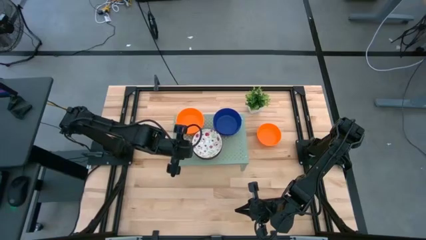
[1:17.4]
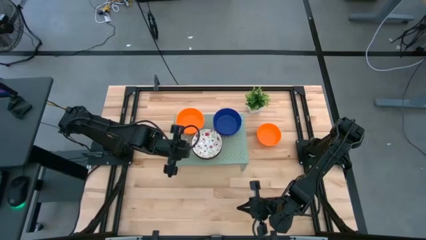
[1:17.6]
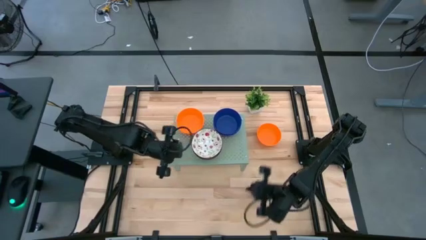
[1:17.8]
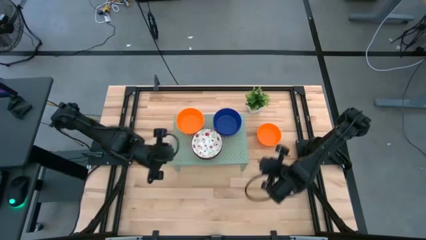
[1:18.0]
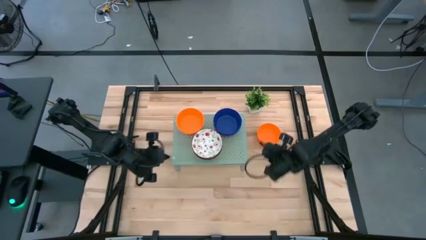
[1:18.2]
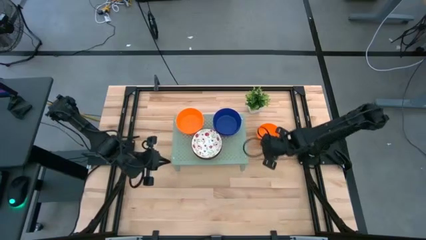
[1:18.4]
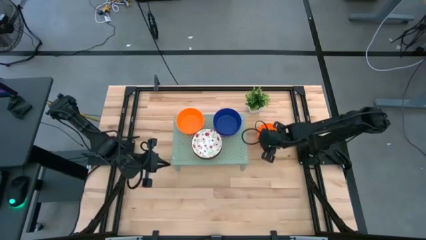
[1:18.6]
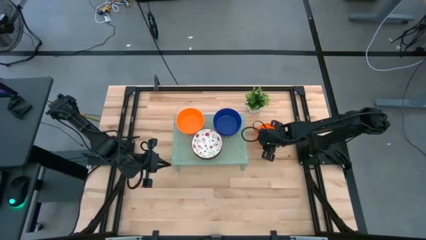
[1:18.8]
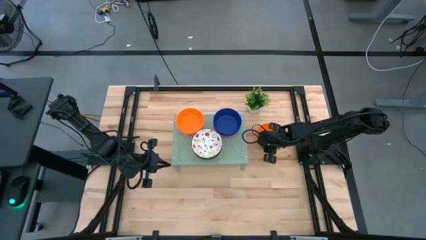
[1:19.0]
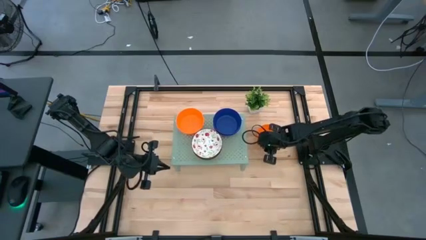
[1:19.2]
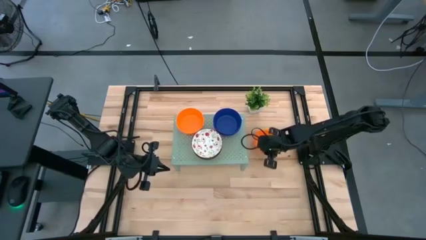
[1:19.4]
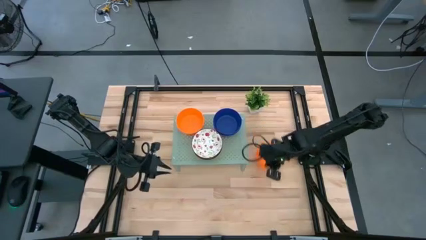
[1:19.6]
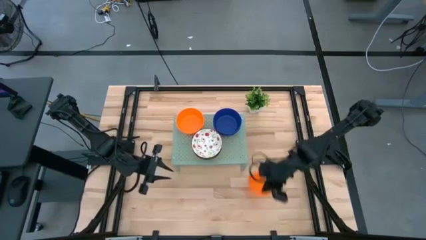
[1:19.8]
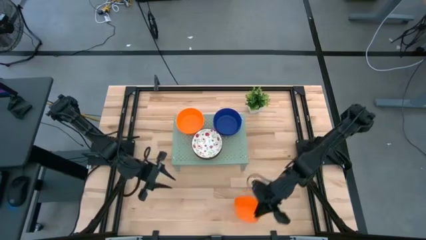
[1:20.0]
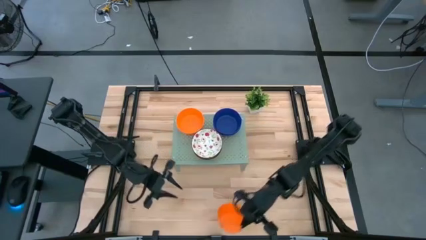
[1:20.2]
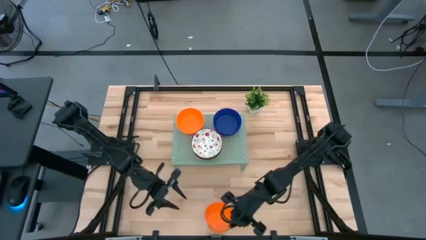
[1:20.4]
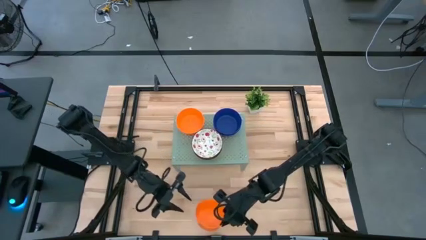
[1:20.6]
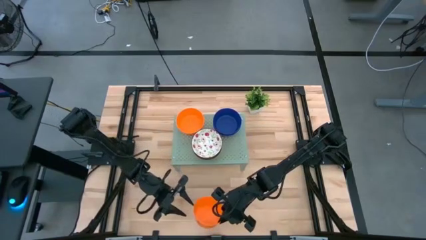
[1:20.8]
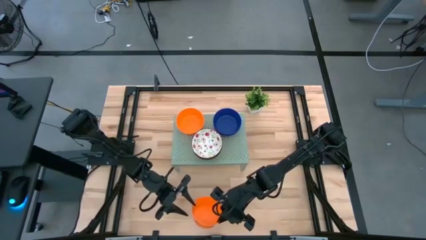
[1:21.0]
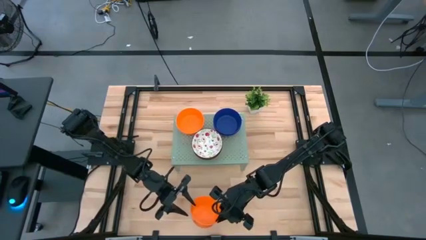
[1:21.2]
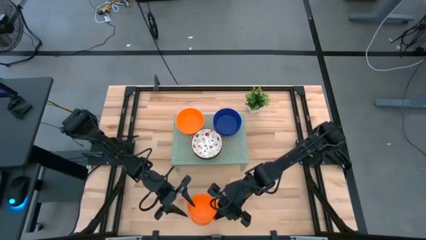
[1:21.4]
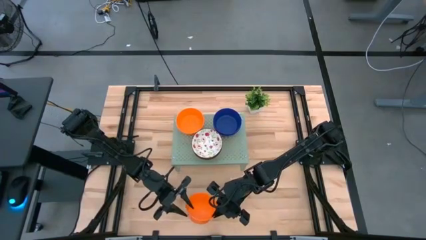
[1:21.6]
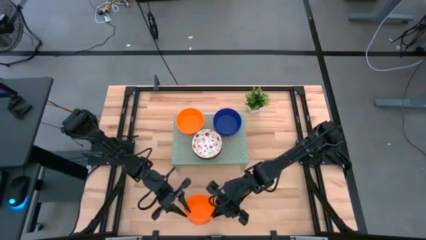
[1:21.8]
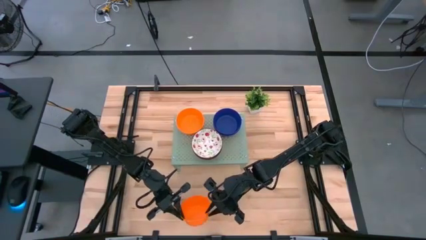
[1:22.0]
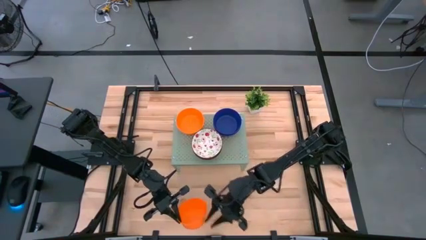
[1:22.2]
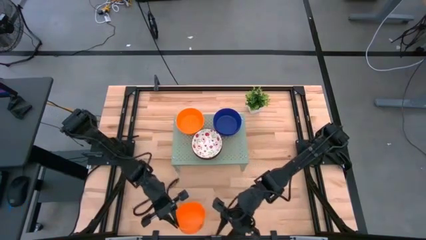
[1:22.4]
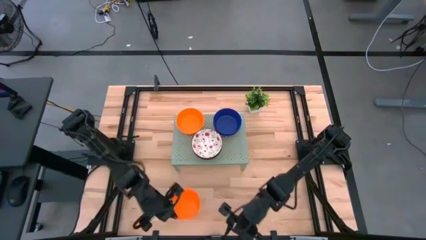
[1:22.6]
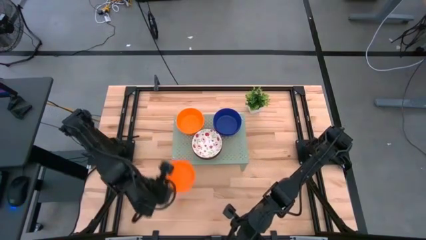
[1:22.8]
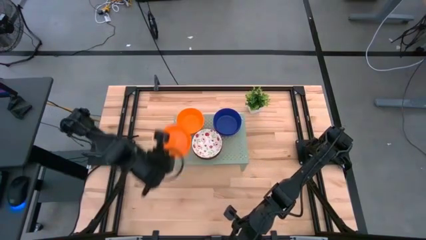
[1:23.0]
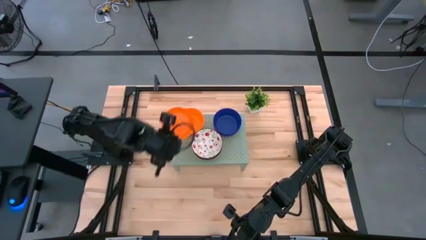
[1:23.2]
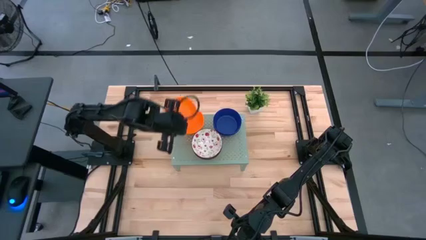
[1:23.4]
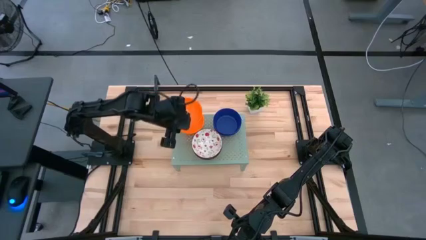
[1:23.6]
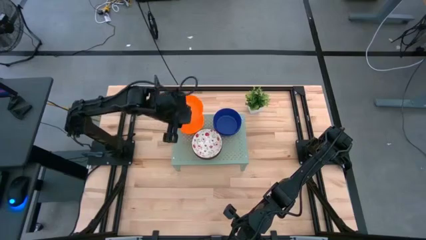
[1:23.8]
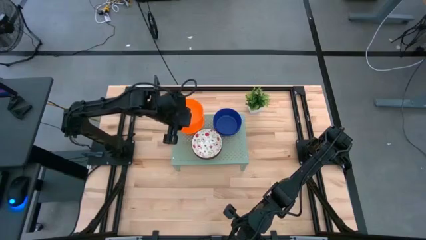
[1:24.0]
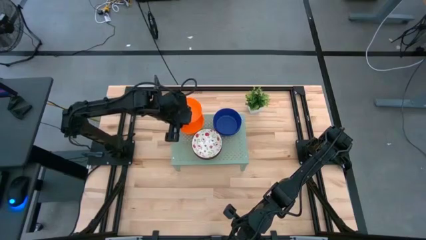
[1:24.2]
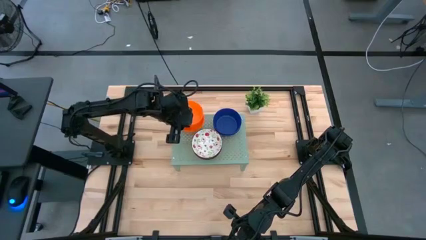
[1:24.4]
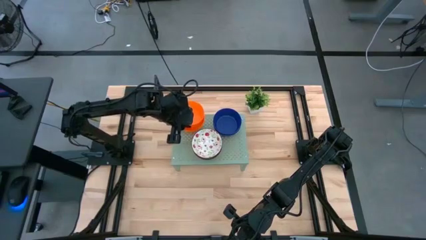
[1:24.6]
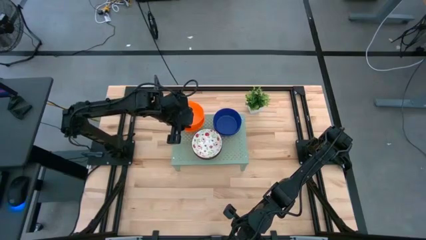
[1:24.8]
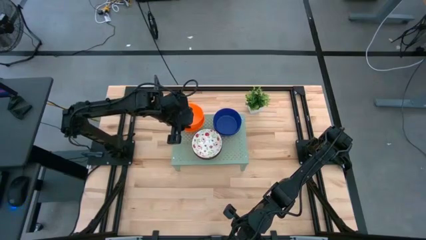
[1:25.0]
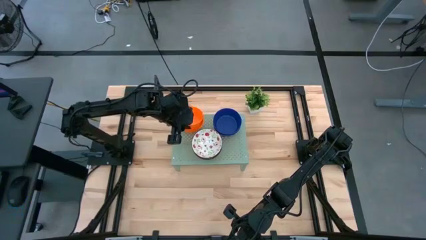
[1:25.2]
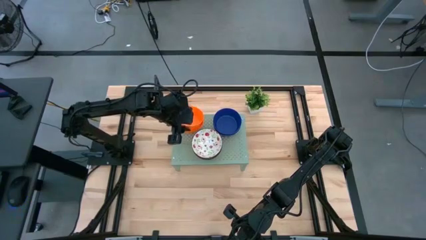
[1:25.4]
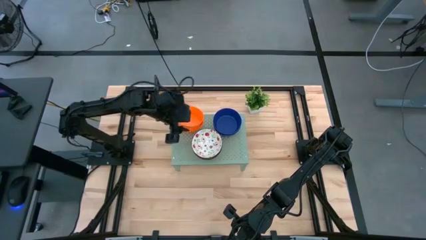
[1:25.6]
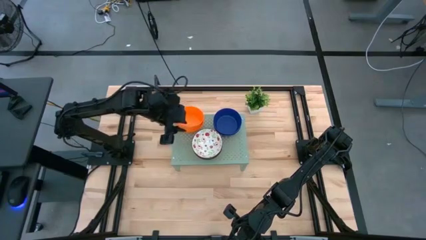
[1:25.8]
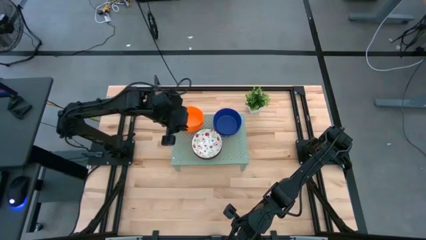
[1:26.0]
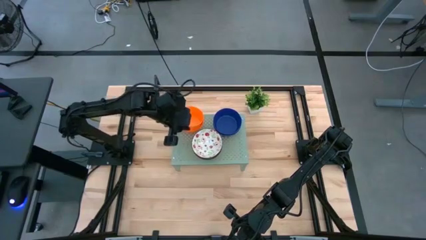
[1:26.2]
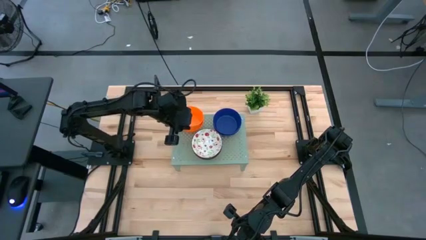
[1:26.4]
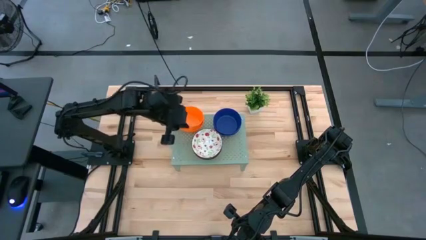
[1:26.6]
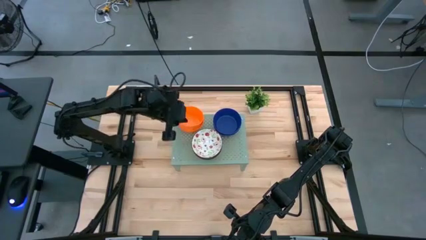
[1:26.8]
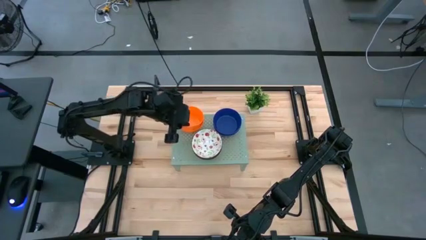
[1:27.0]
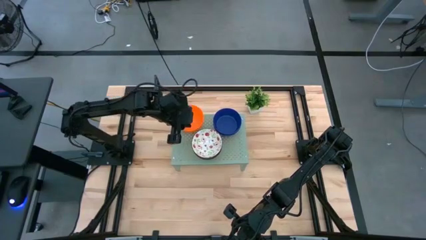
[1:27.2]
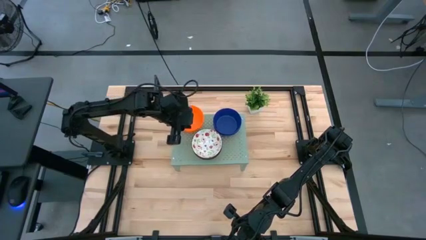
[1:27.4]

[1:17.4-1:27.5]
Task: Pick & Place Mini bowls
Stack the orange bowl on top of the orange bowl on the shelf

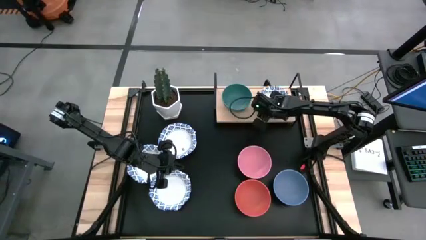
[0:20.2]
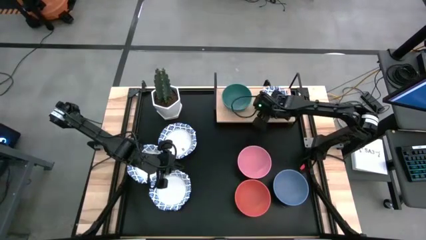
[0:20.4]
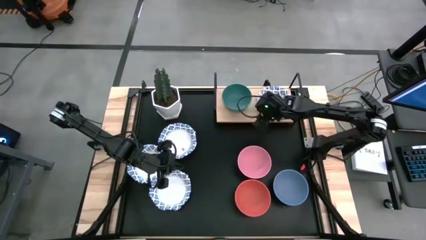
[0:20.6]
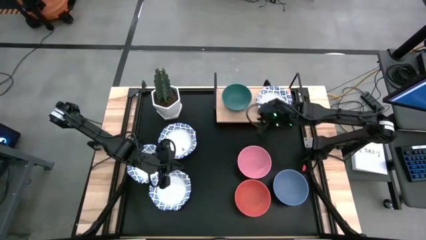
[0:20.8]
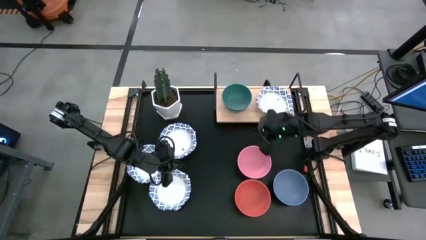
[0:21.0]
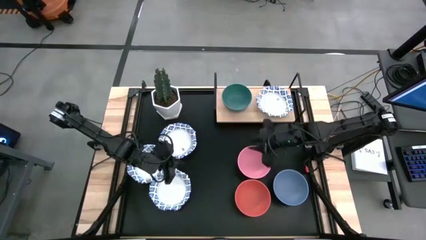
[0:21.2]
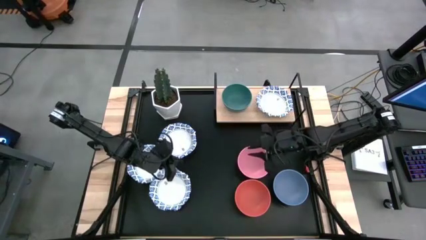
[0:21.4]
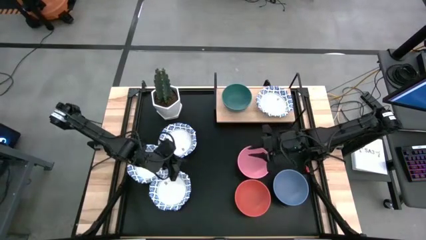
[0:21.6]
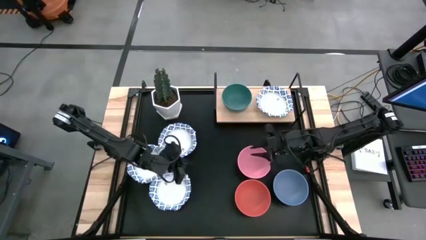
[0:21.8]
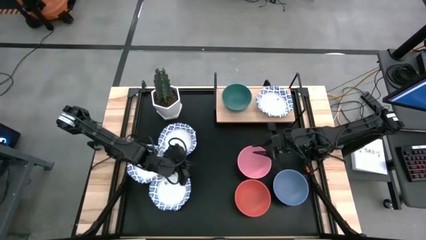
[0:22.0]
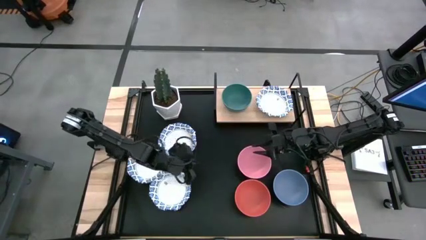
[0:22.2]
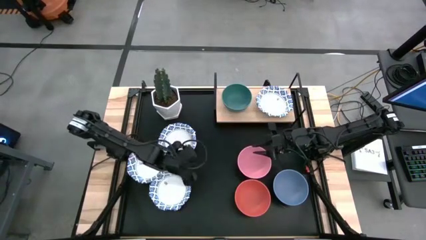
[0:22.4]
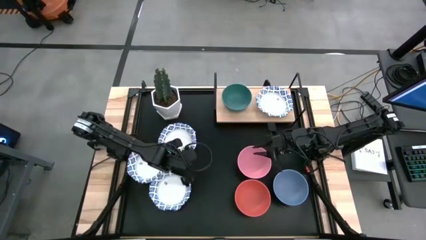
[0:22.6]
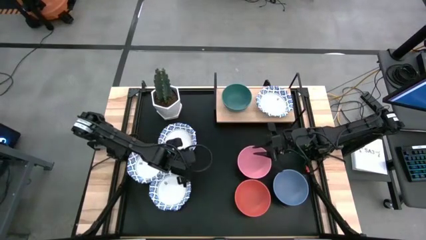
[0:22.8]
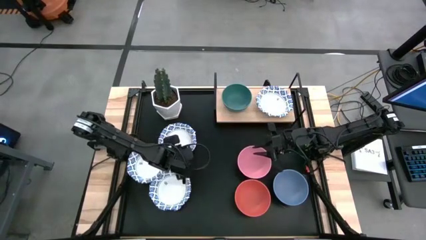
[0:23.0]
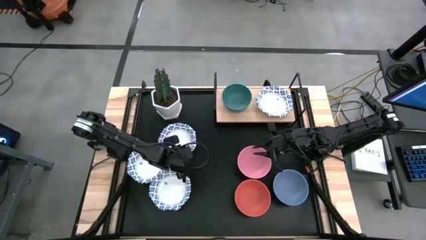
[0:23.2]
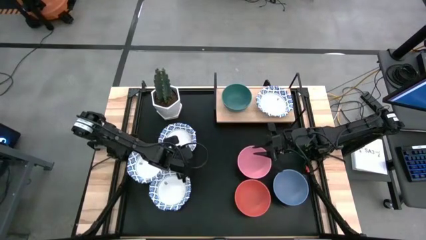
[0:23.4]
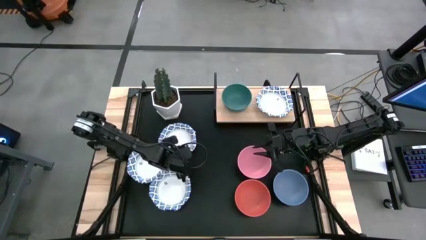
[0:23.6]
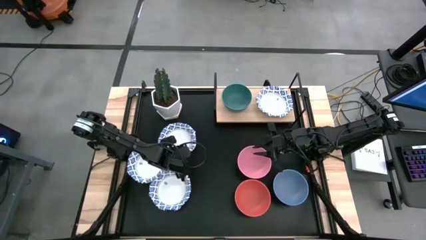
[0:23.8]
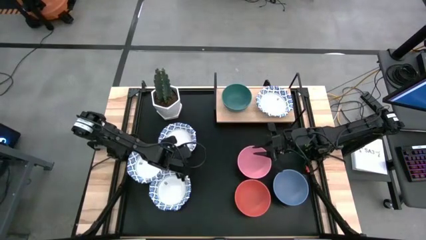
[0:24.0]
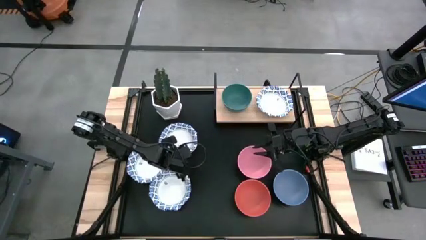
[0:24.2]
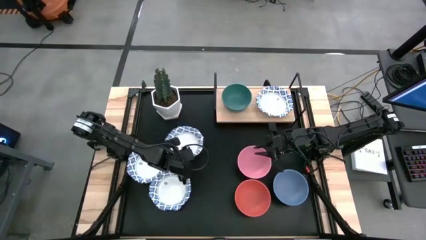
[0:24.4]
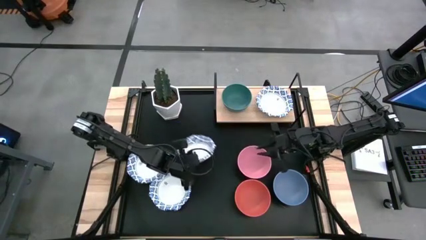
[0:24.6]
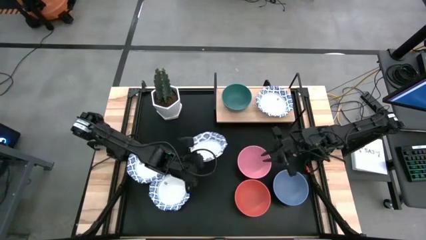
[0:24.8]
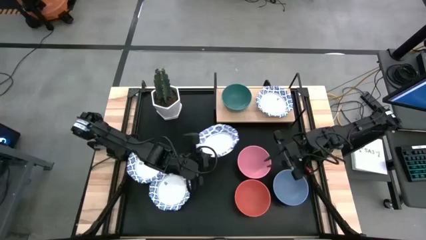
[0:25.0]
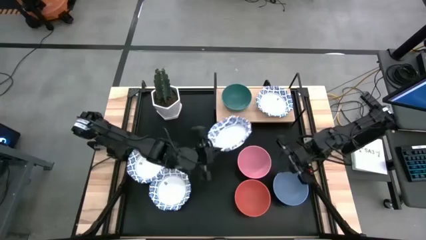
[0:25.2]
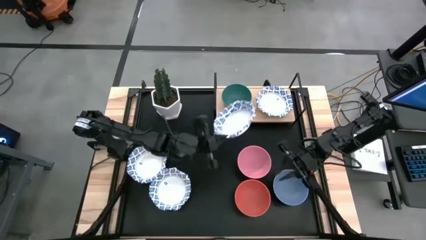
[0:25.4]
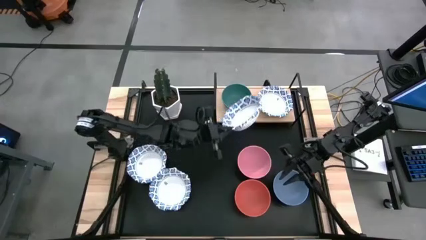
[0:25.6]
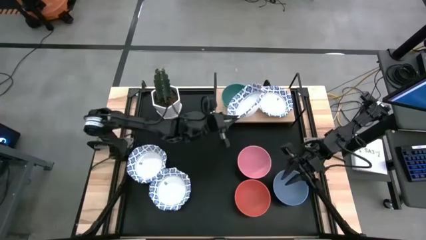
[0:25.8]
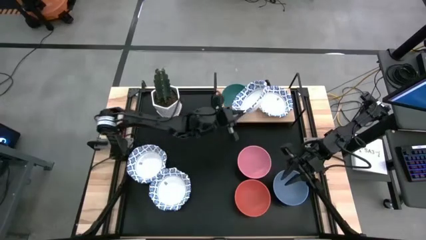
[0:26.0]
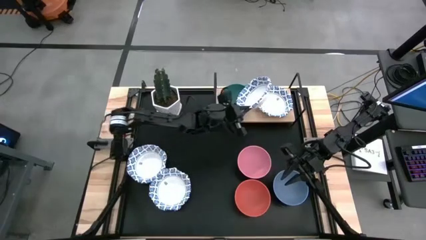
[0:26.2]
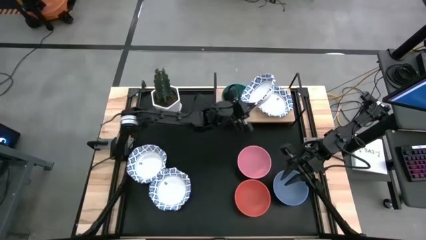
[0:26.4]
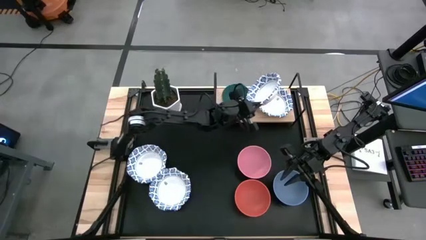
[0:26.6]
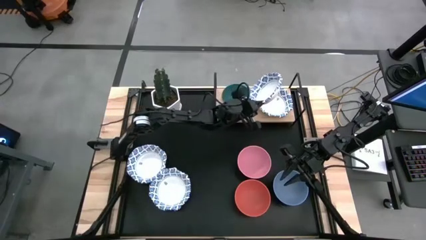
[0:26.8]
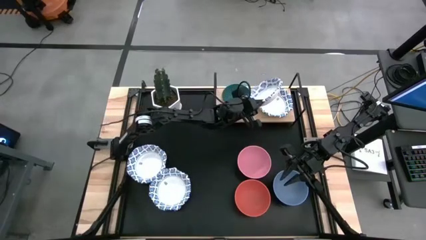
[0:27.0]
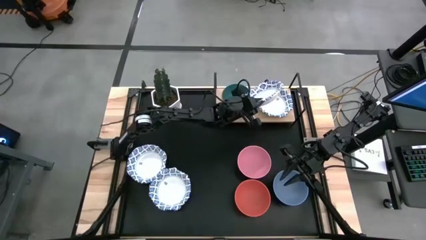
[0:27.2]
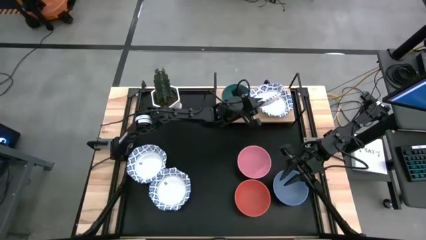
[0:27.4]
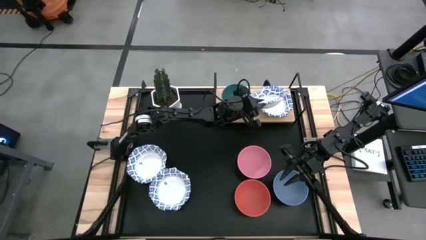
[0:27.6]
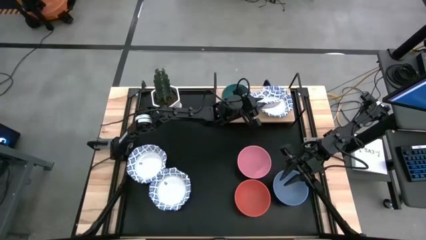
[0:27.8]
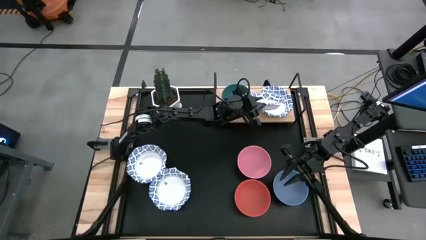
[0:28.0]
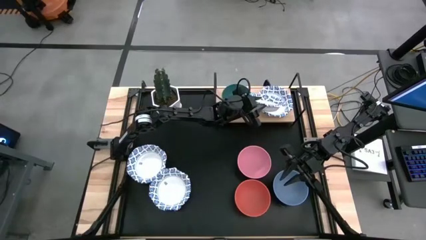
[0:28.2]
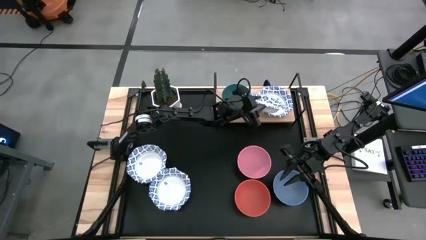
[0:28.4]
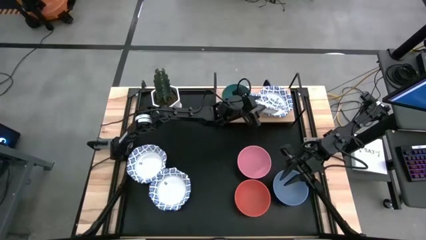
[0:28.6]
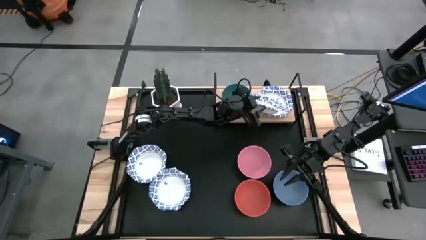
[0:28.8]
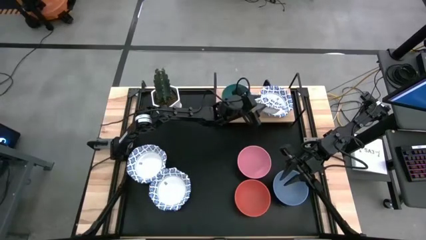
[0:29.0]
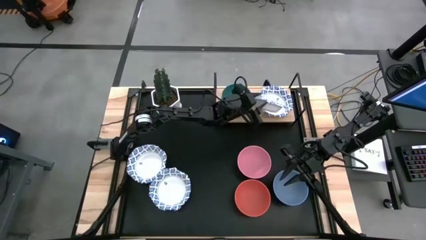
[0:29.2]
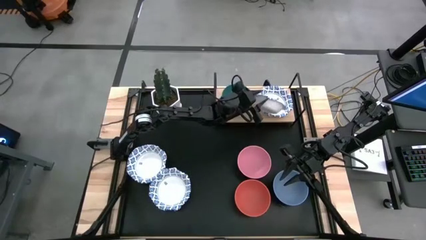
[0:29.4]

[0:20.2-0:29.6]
Task: Place and stack bowls onto a shelf
Stack the blue patterned bowl on top of the blue patterned bowl on the shelf
